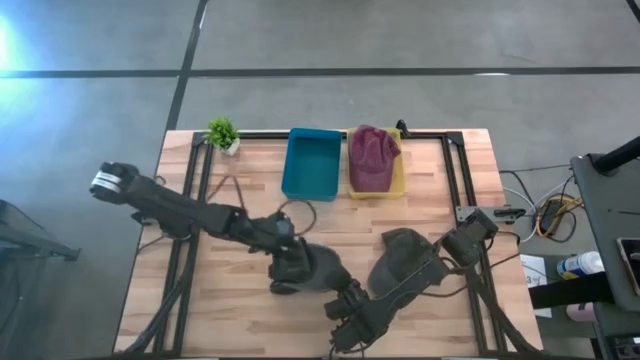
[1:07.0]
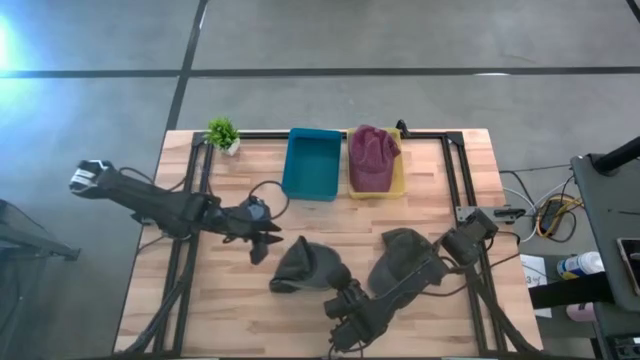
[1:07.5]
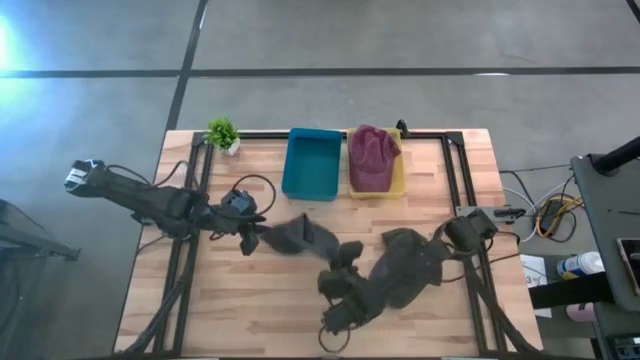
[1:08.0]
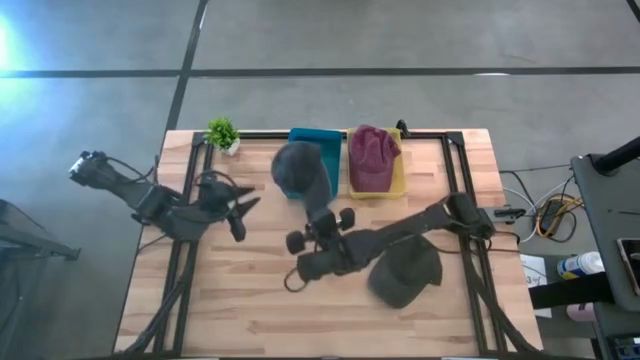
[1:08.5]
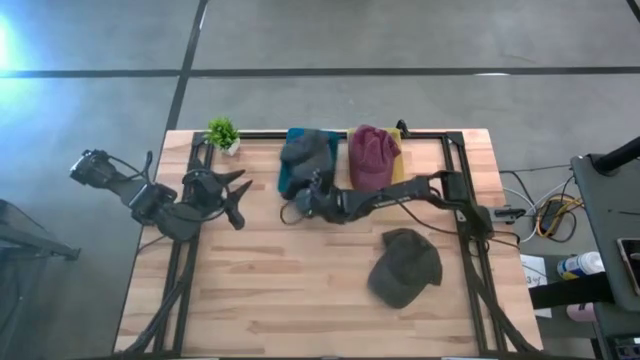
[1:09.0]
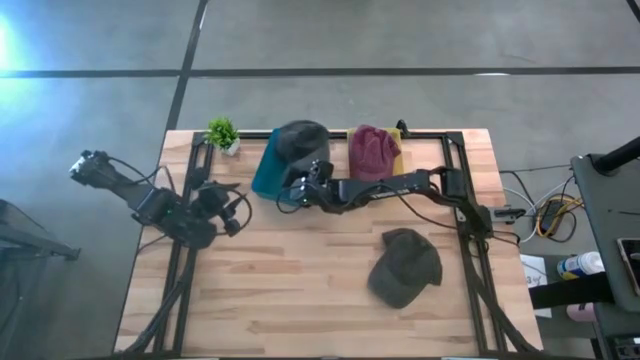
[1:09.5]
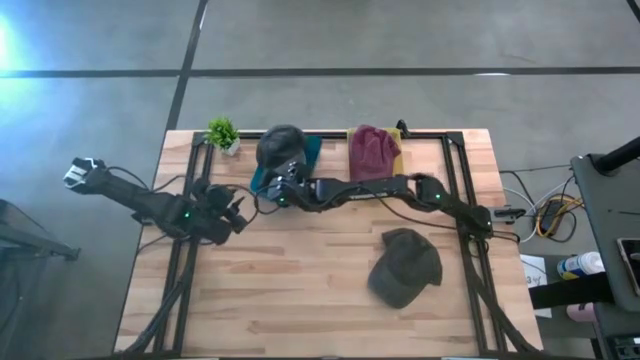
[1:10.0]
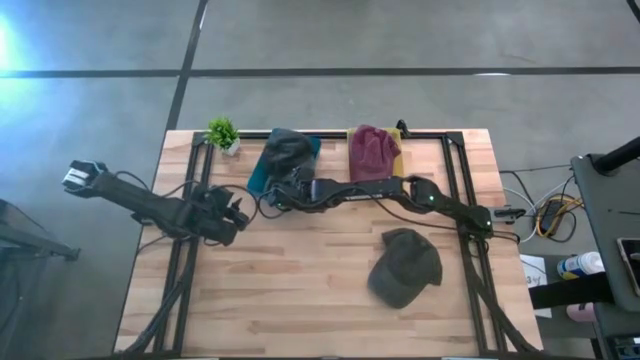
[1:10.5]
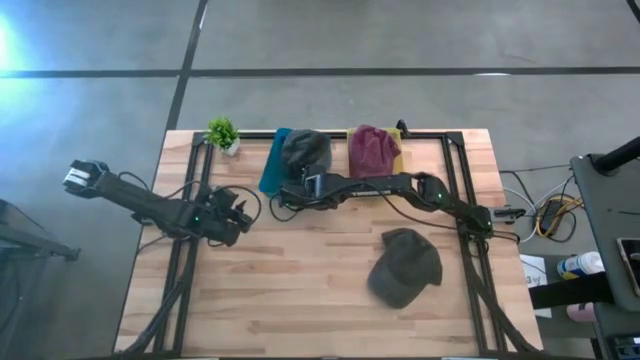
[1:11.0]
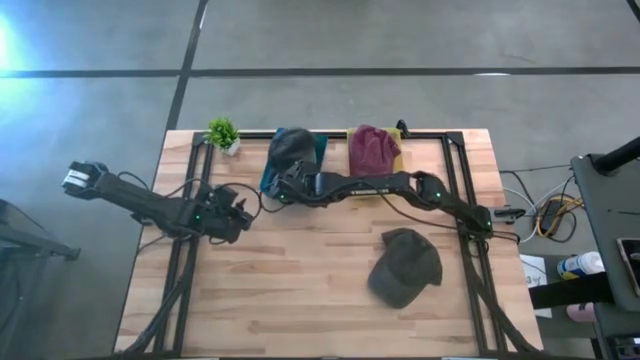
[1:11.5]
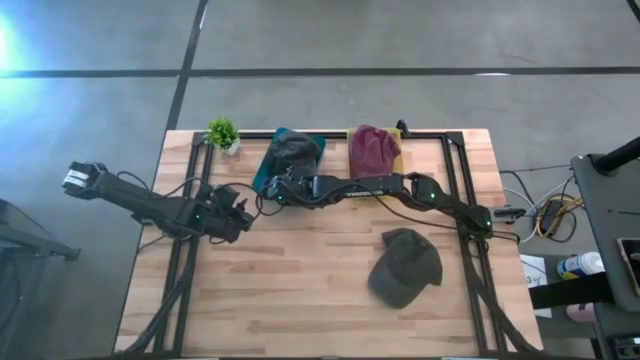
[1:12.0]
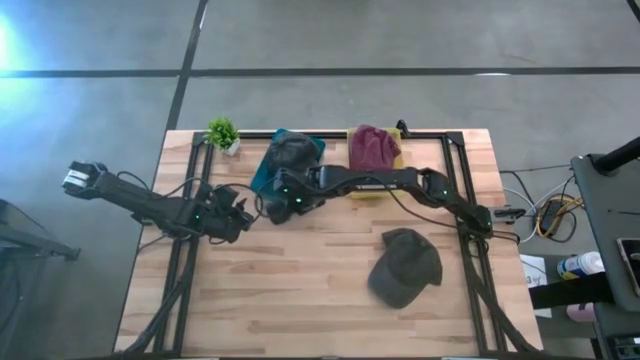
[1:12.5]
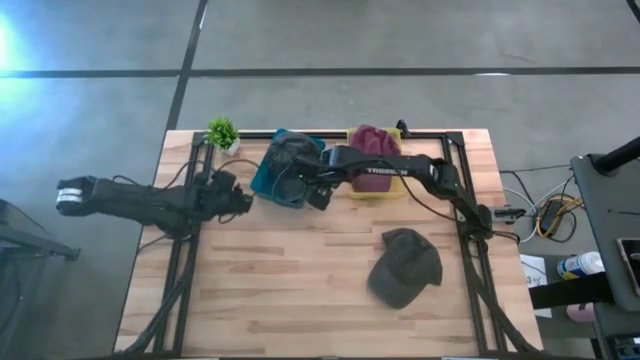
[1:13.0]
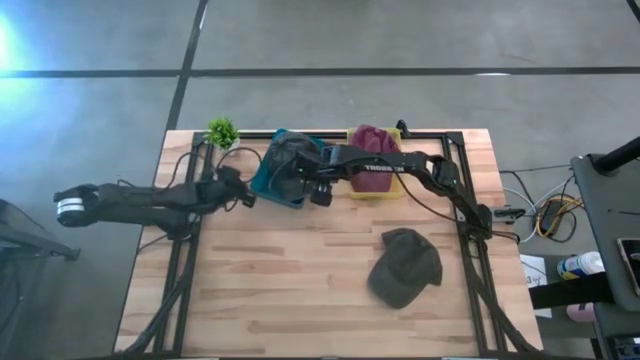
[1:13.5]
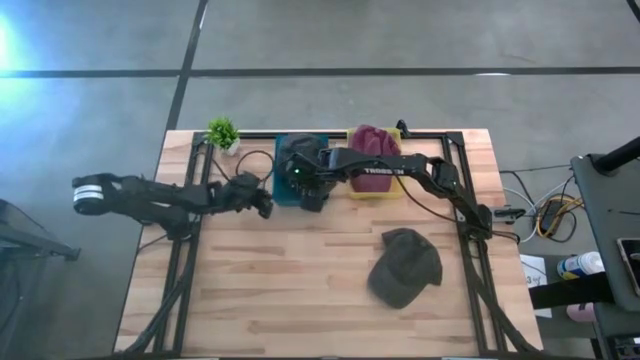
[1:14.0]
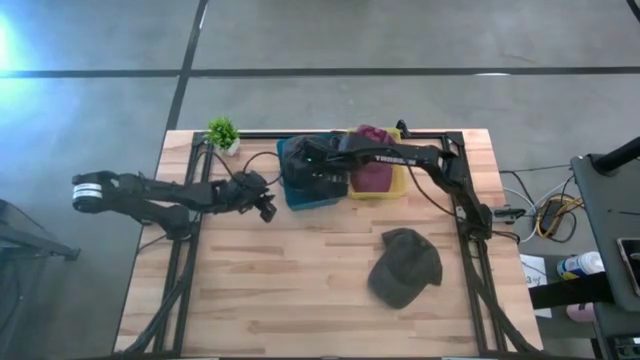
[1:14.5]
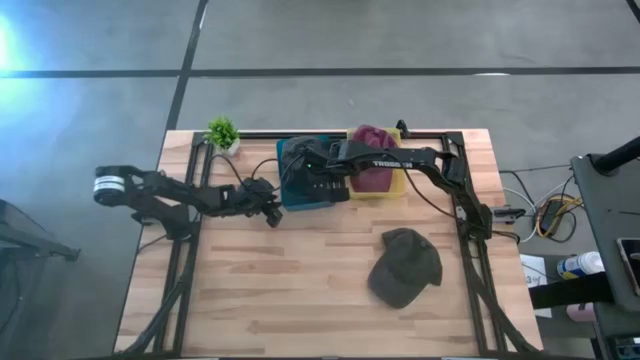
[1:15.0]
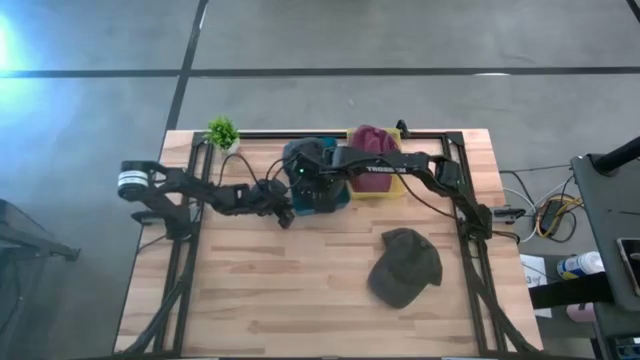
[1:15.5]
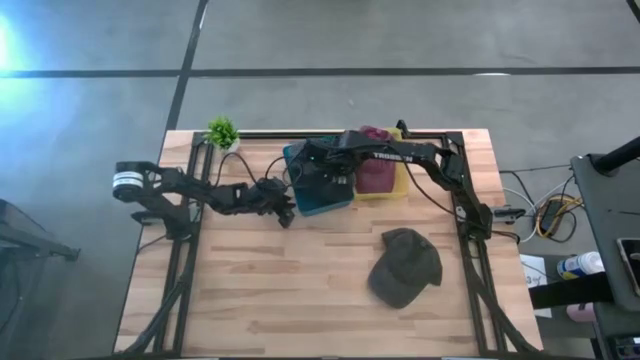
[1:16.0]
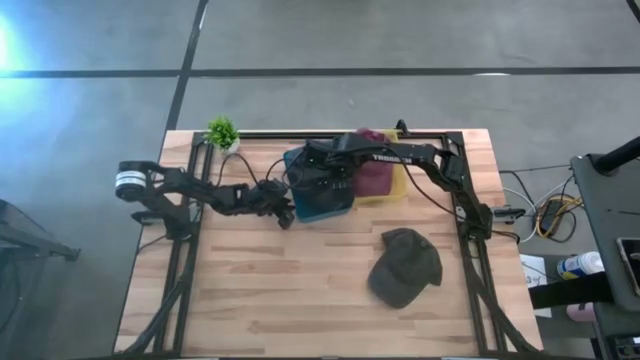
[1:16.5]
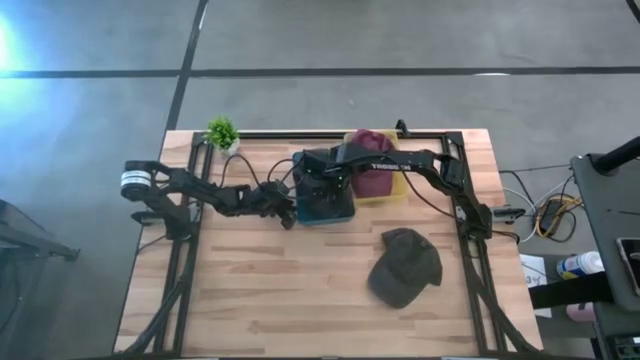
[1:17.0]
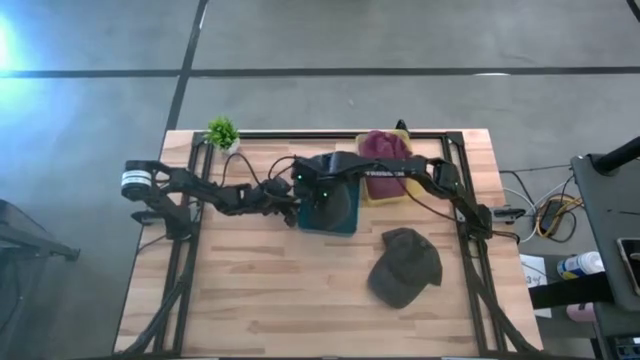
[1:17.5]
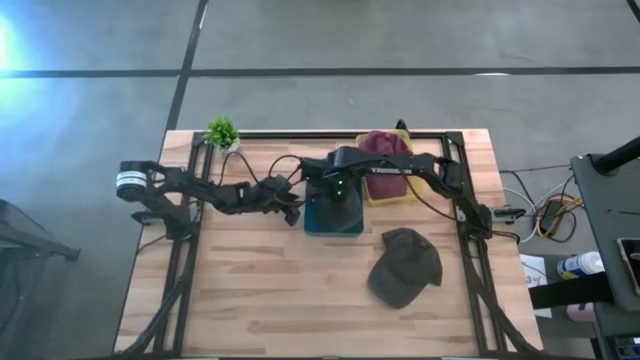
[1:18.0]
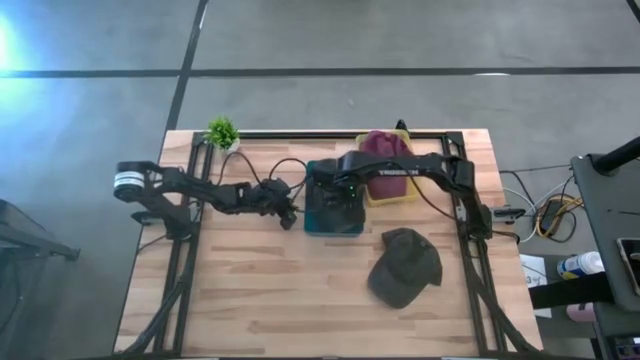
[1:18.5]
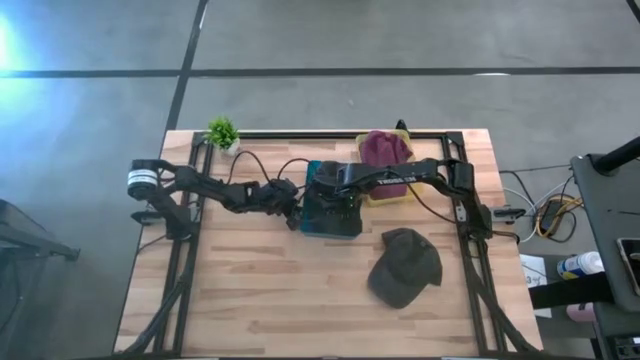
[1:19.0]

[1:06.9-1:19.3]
Task: Pick & Place hat
Put the top black cap into the blue bin

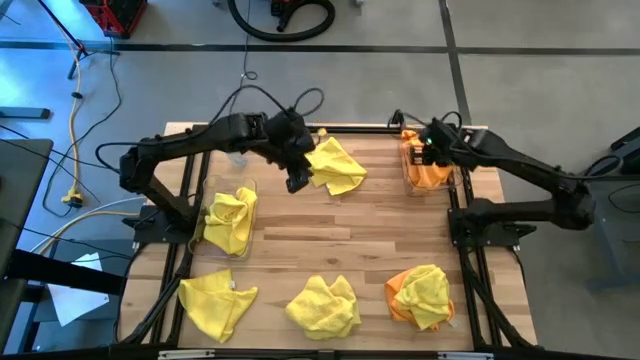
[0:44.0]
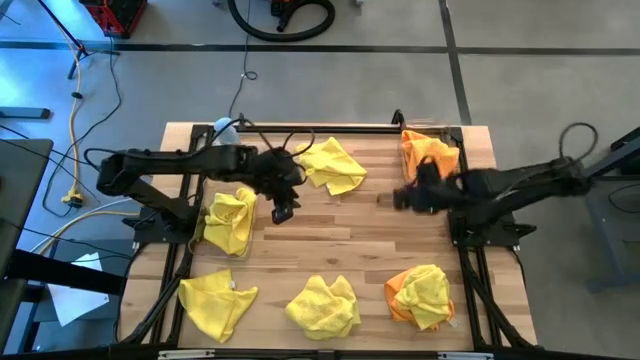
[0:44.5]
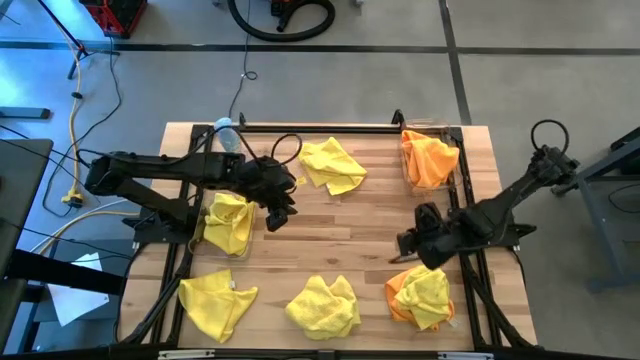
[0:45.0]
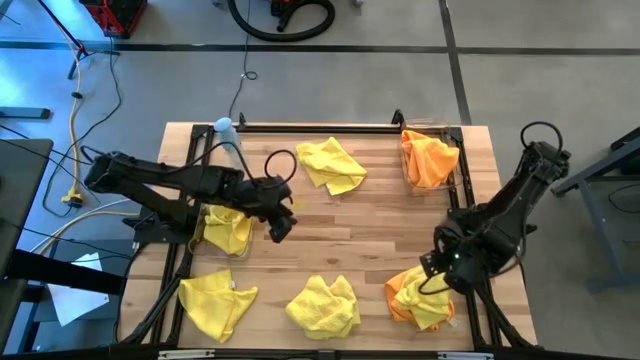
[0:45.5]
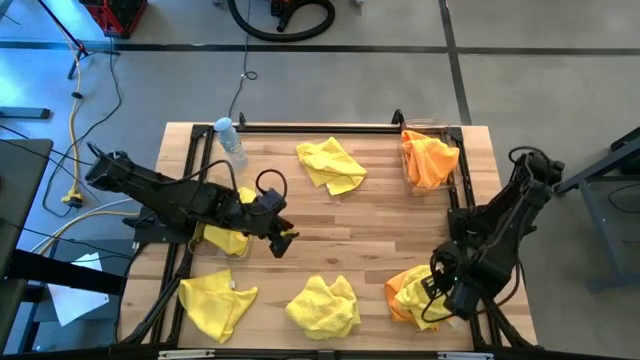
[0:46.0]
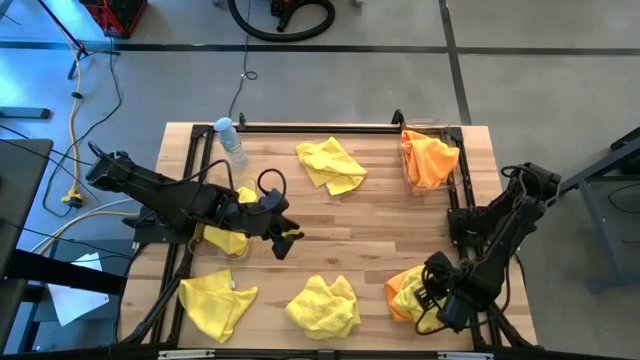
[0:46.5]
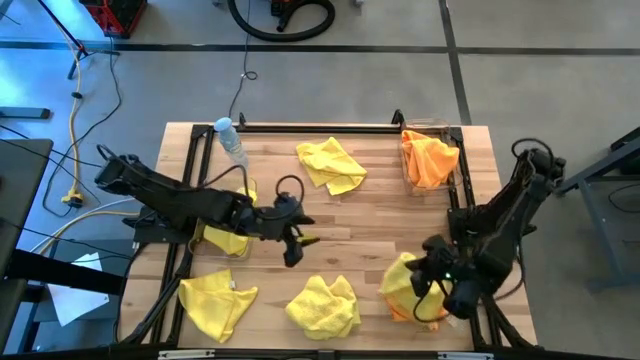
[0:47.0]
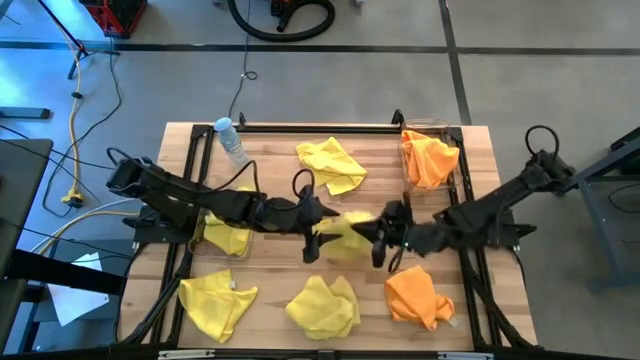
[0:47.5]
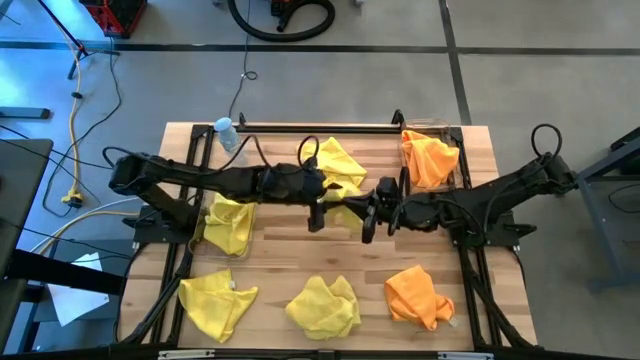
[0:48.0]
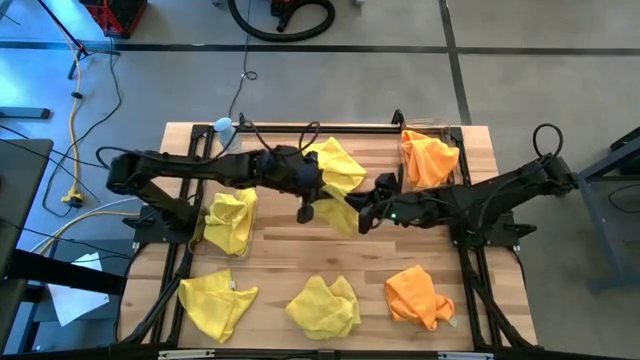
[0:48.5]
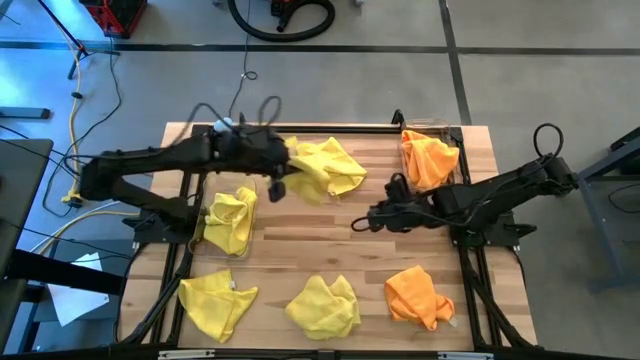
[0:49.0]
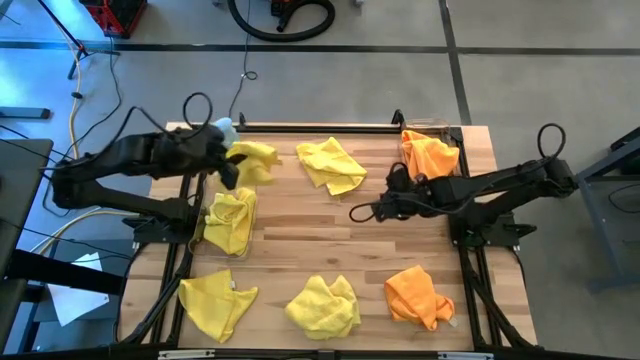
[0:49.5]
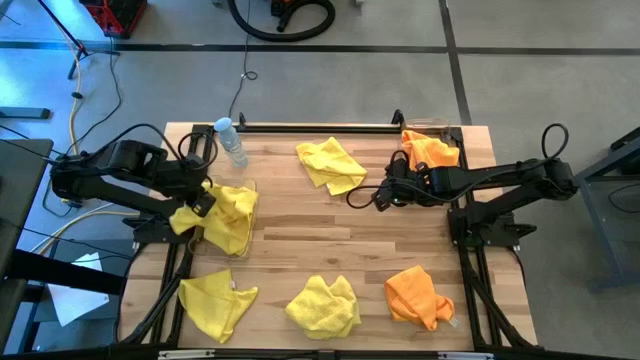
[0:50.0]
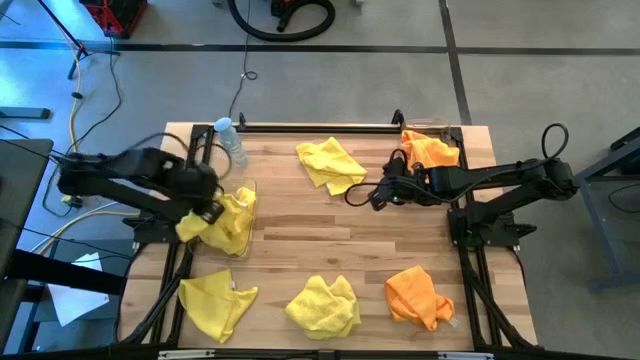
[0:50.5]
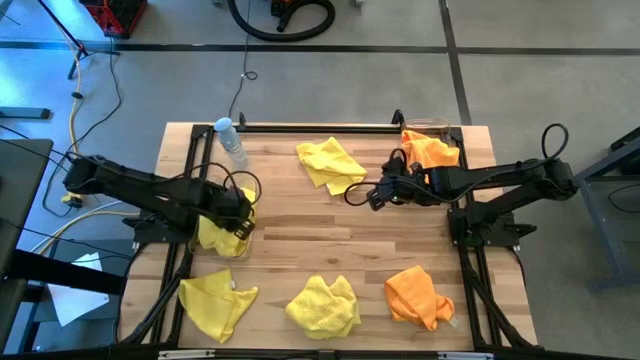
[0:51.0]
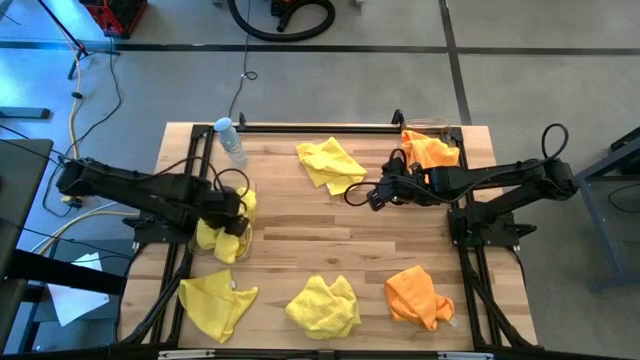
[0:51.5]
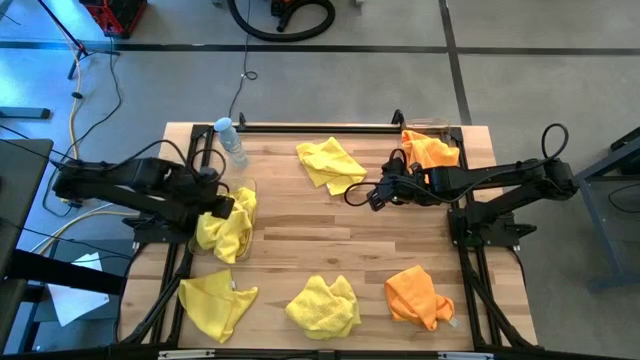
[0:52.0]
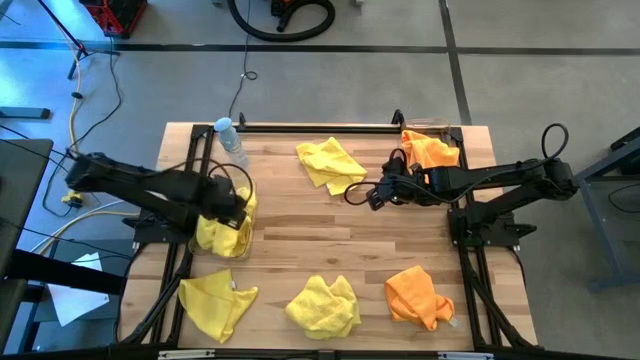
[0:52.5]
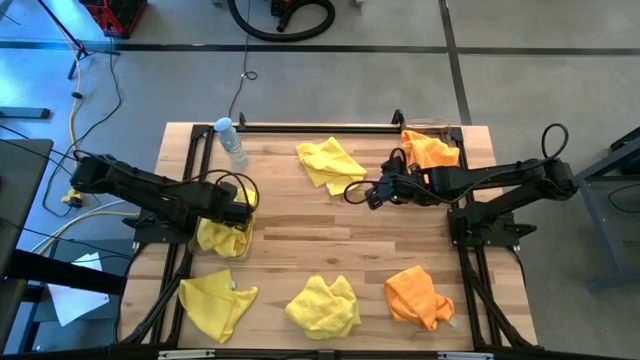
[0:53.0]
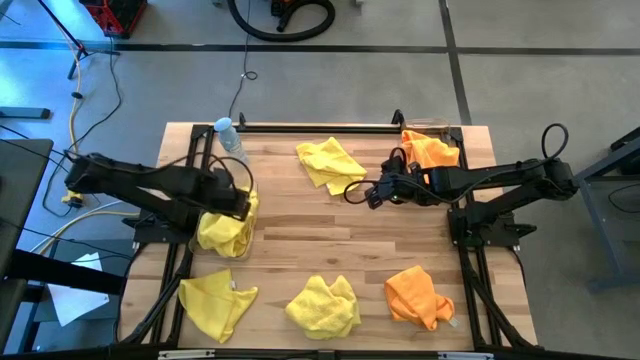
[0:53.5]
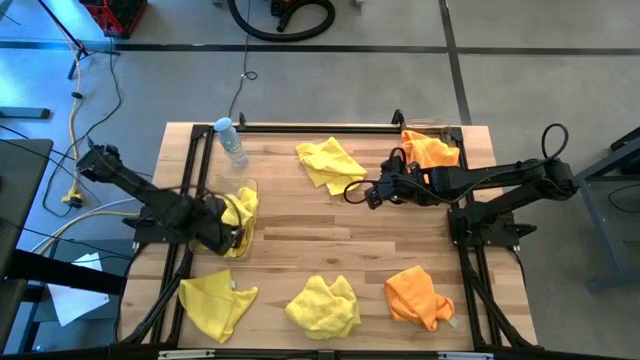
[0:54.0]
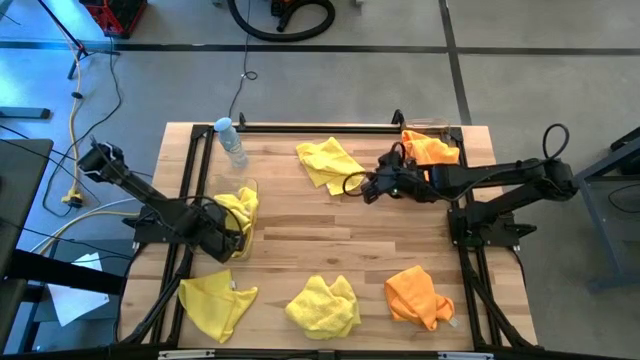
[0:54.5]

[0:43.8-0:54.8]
Task: Sort microfiber towel by color & place in baskets
Put the yellow microfiber cloth into the left transparent bin
